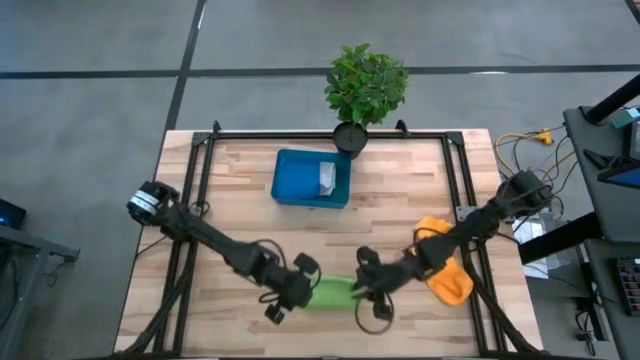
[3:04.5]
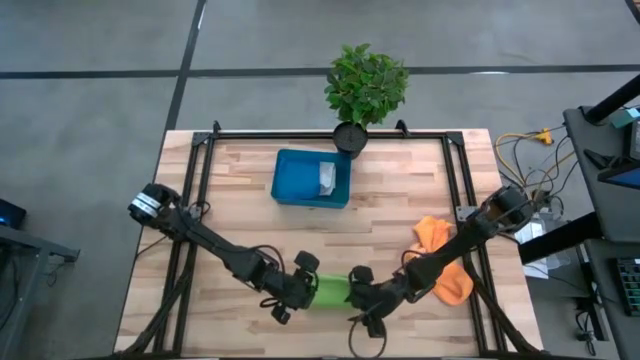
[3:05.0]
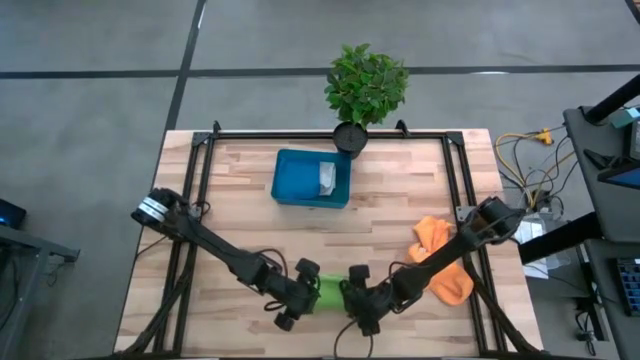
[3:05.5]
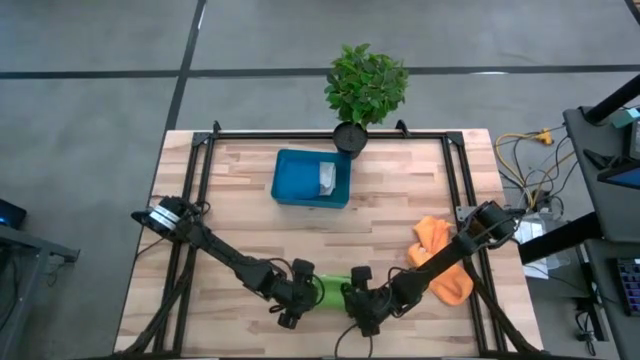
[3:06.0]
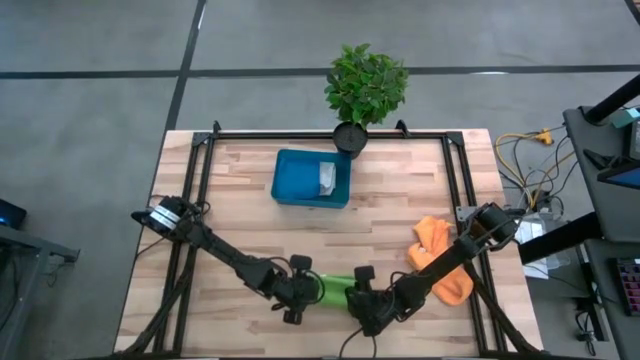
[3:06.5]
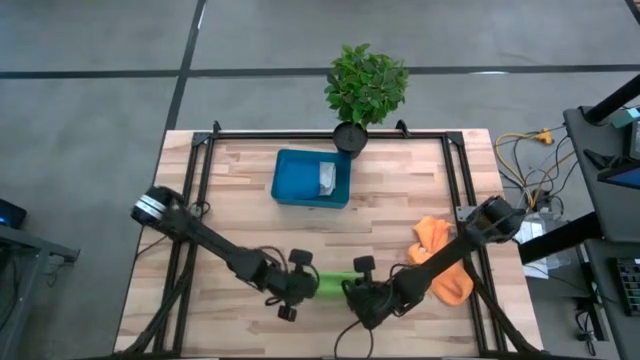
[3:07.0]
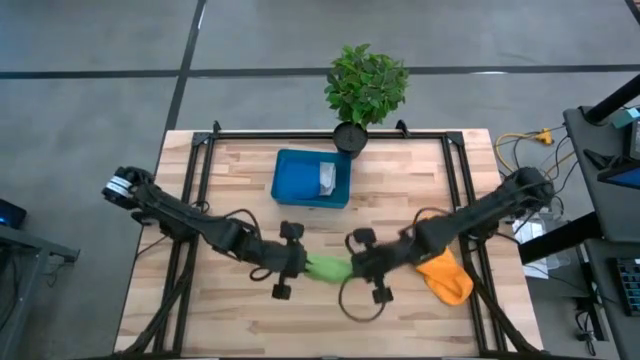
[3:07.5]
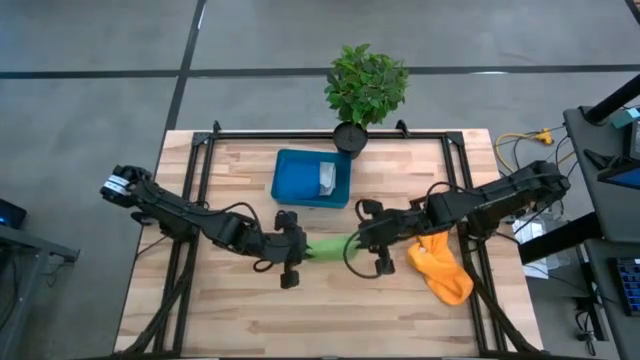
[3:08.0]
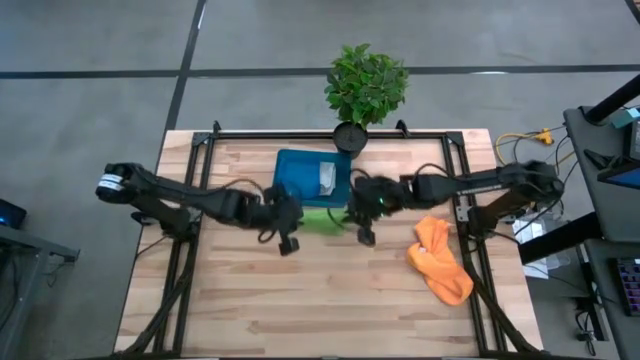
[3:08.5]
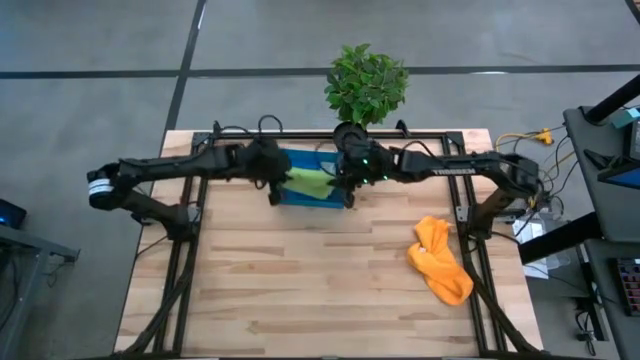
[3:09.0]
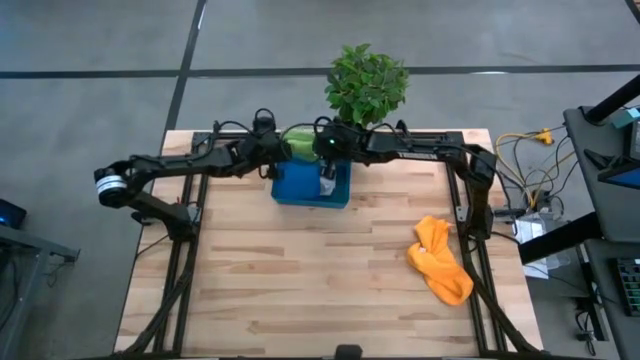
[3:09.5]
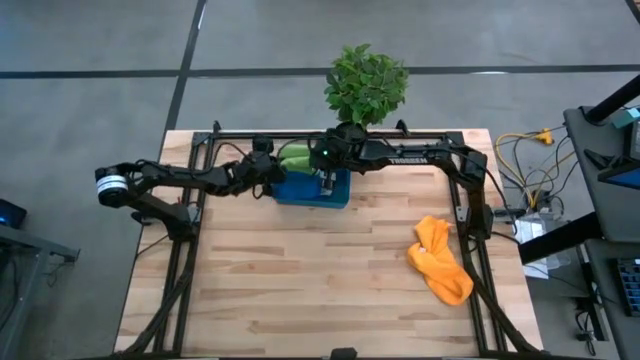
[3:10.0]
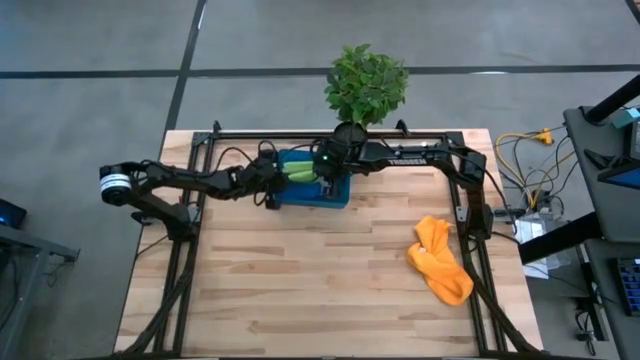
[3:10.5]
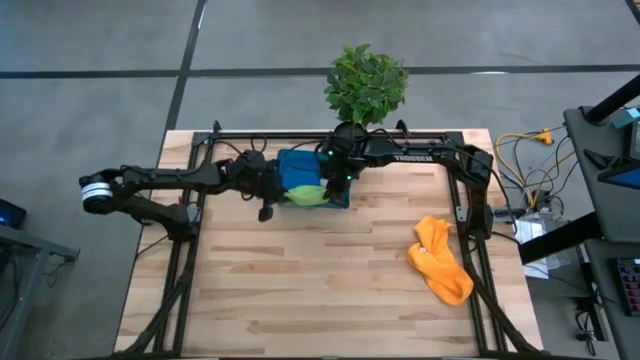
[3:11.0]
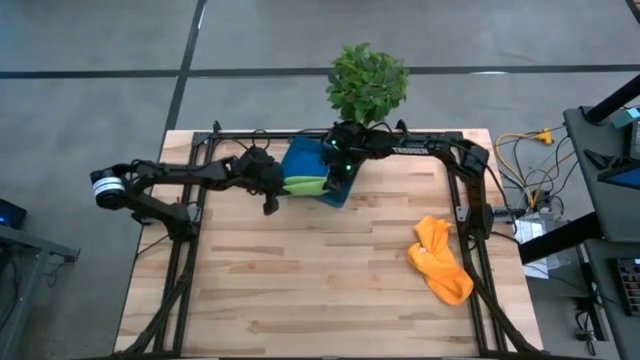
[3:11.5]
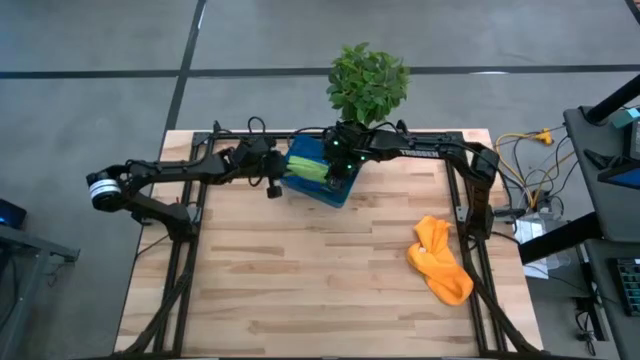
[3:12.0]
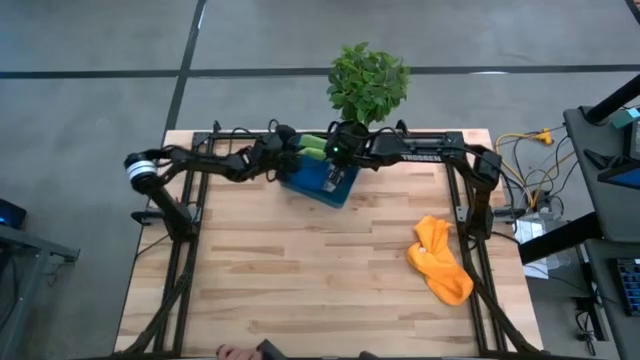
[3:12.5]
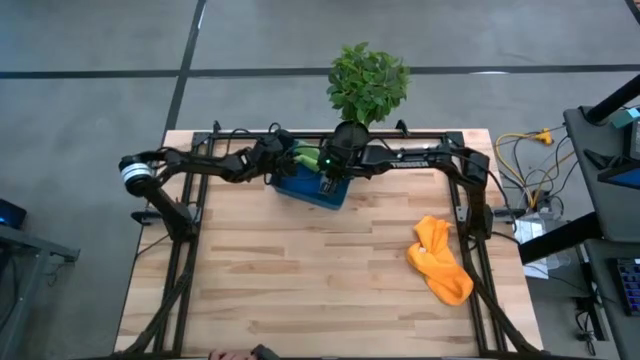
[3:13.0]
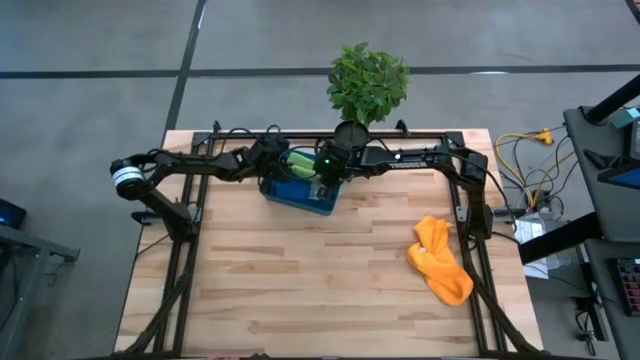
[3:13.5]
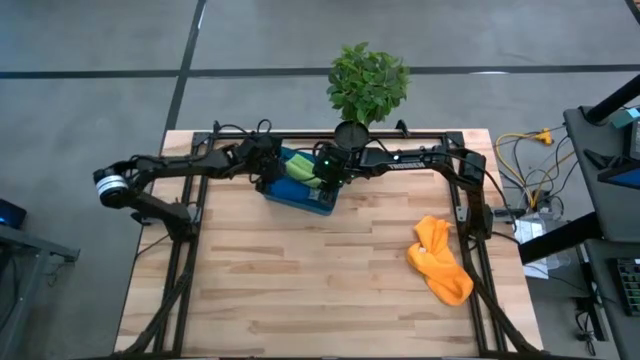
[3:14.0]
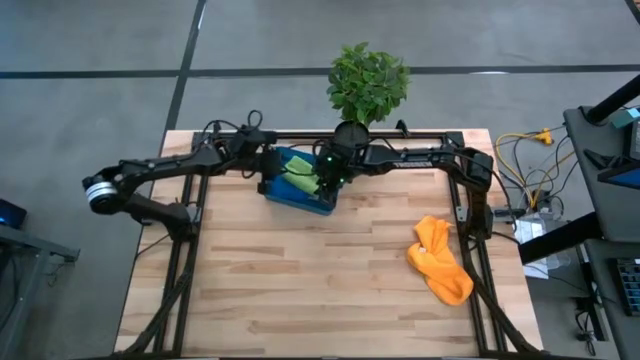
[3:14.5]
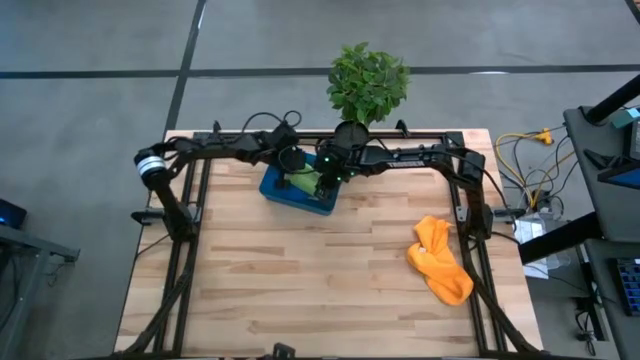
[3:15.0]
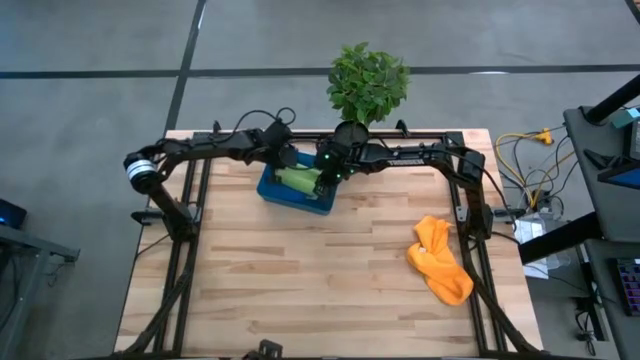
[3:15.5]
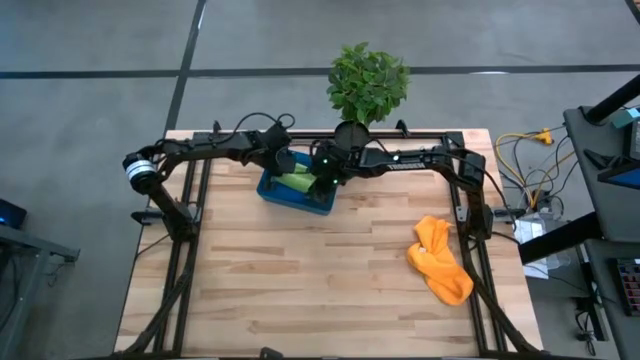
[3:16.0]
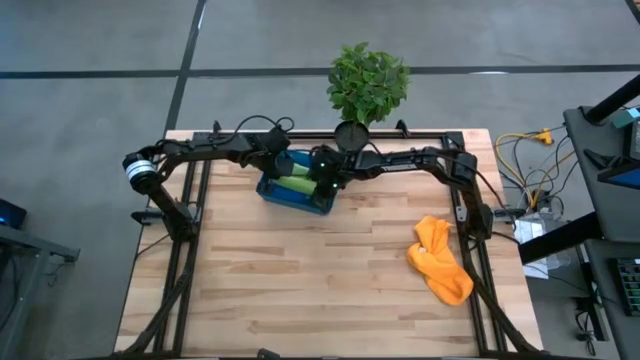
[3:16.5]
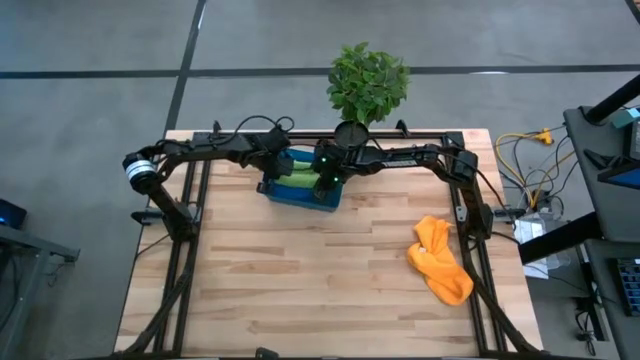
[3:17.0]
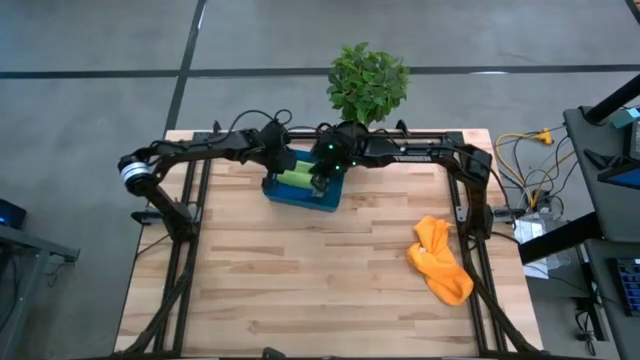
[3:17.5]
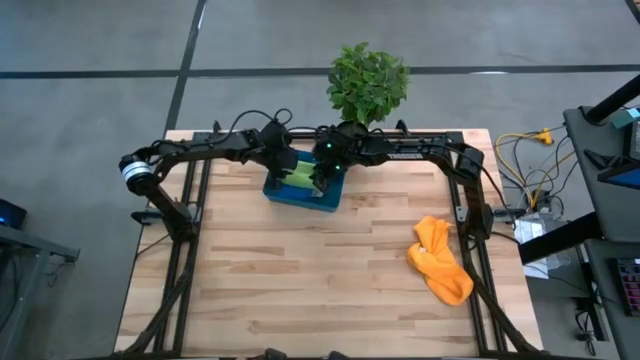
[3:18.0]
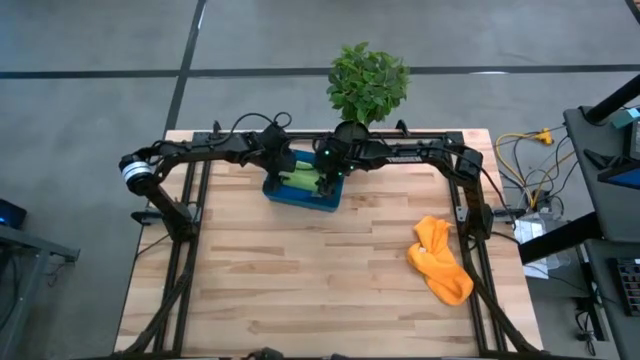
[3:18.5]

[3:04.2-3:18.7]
Task: Fold microfiber towels
Put the green microfiber towel into the blue bin

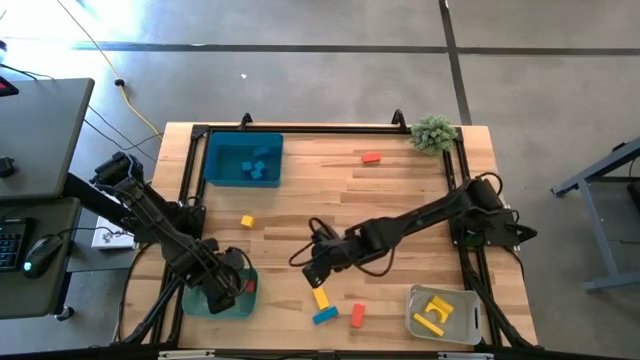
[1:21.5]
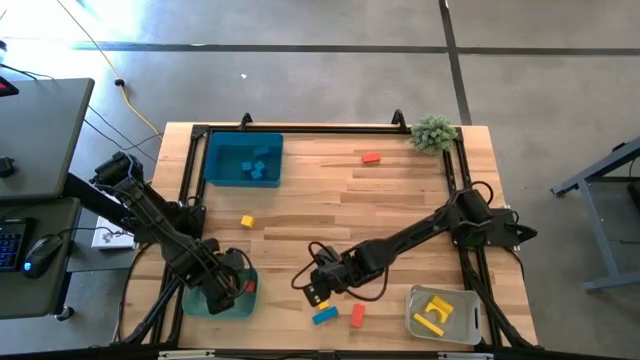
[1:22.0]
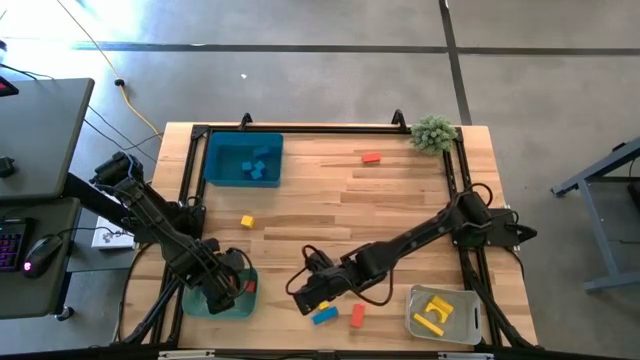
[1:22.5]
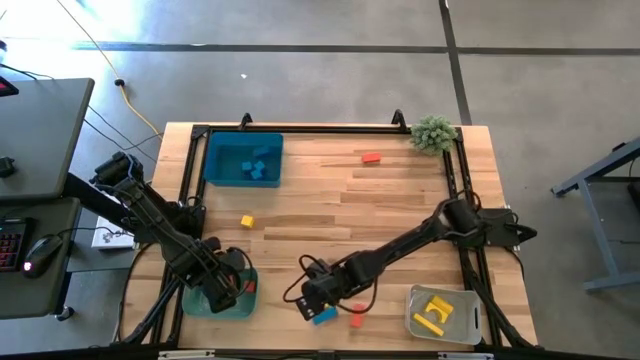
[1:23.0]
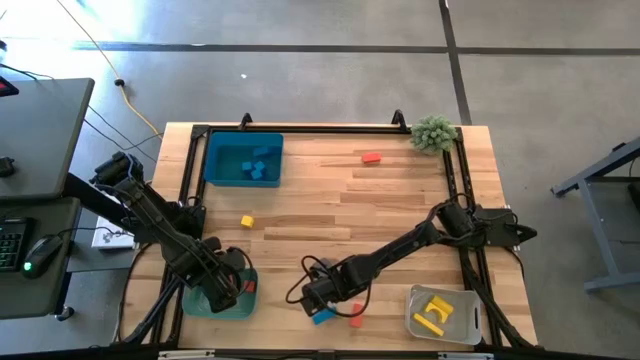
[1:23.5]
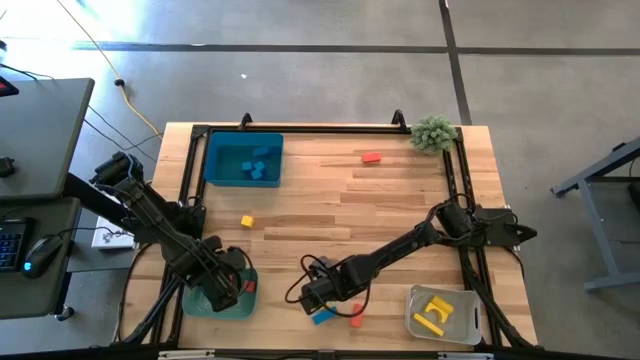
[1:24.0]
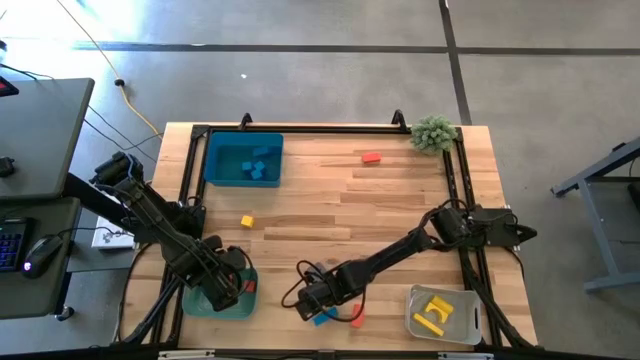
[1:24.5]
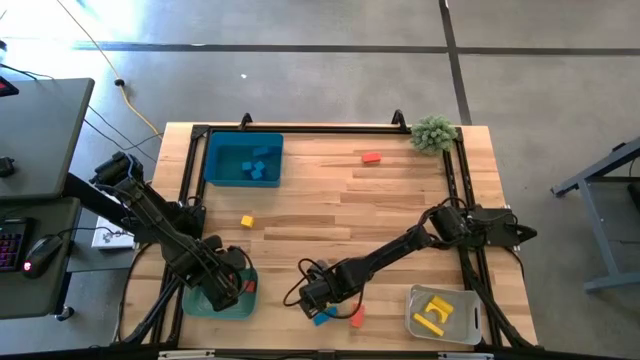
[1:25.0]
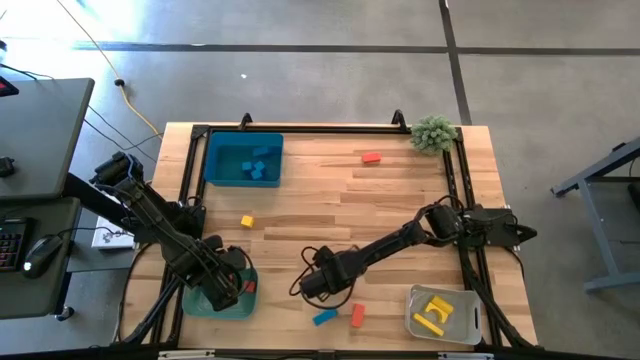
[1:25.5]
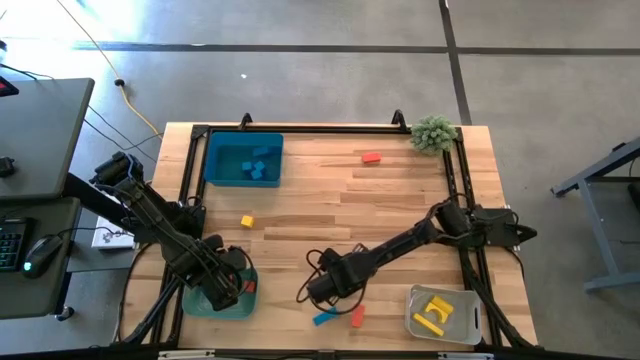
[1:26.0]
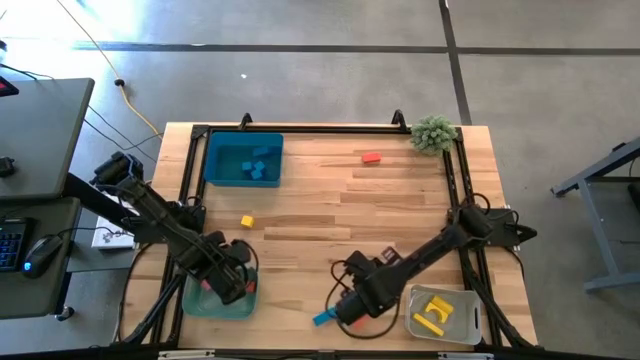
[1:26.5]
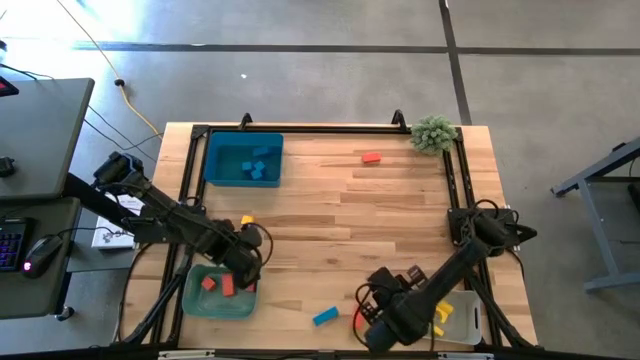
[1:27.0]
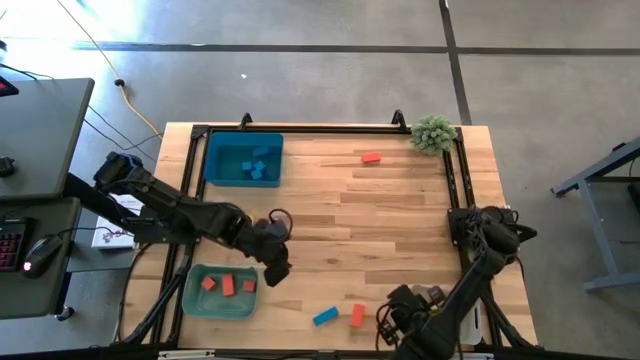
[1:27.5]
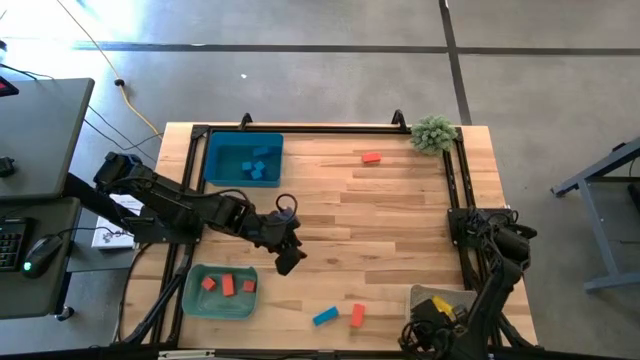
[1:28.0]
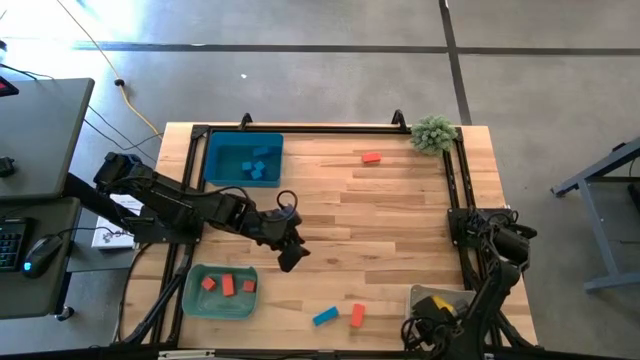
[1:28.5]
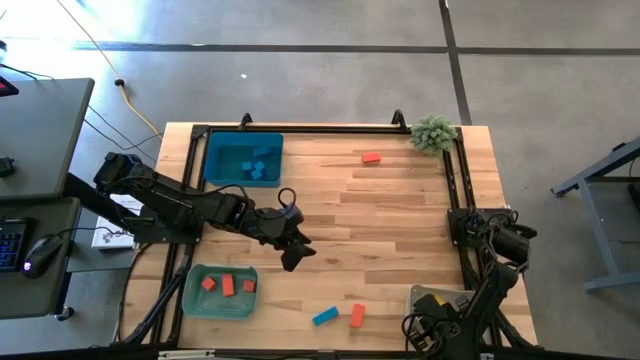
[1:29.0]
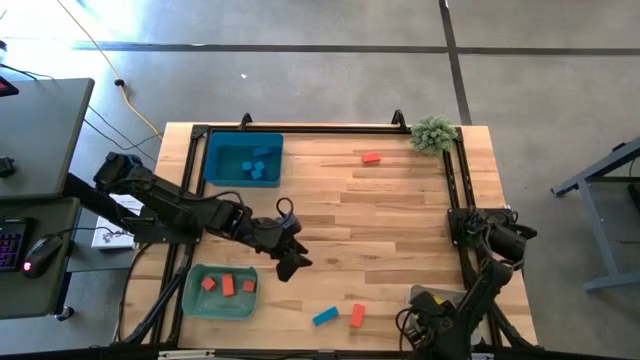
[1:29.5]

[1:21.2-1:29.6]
Task: Sort & place blocks by color
Put the yellow block into the gray bin
